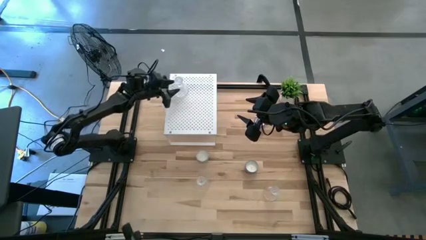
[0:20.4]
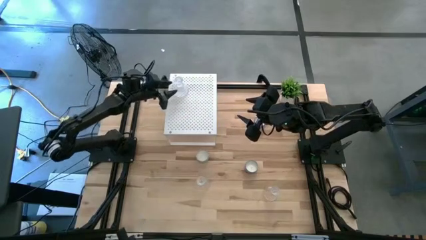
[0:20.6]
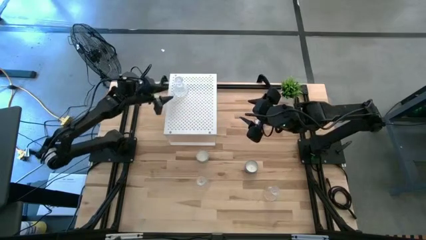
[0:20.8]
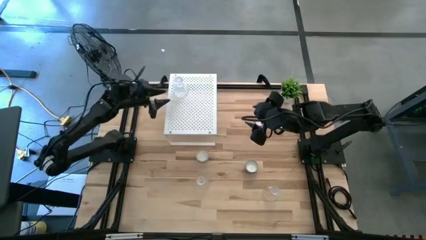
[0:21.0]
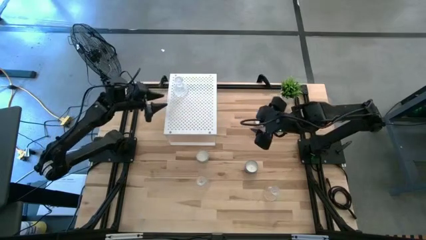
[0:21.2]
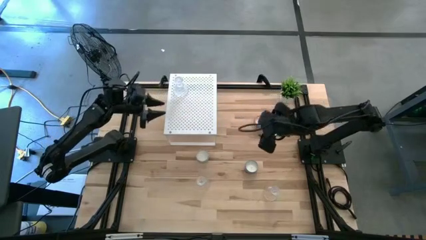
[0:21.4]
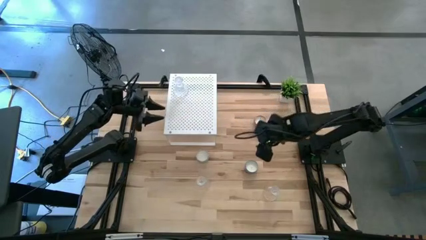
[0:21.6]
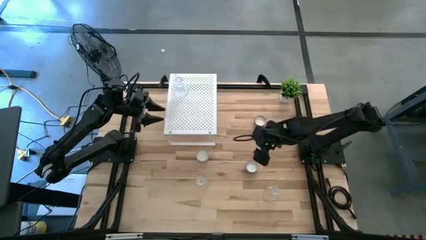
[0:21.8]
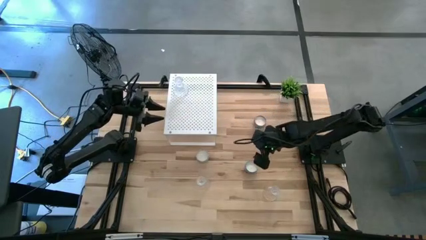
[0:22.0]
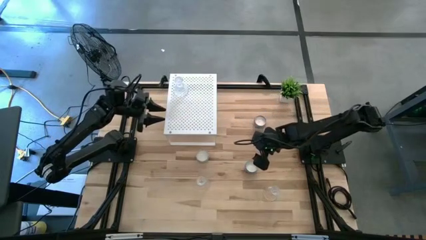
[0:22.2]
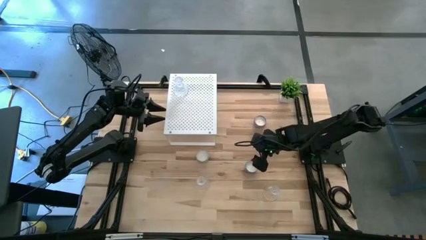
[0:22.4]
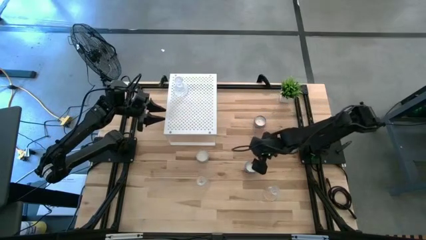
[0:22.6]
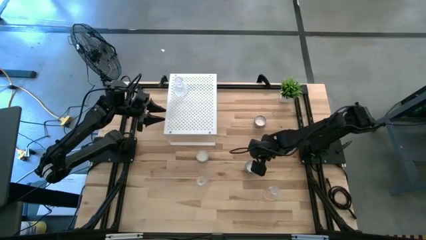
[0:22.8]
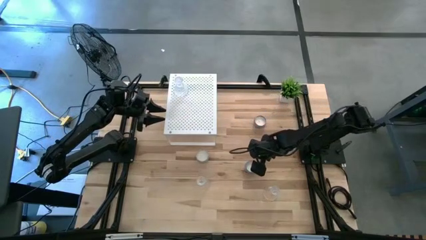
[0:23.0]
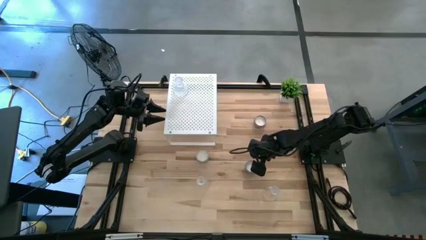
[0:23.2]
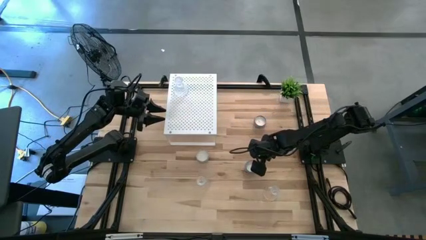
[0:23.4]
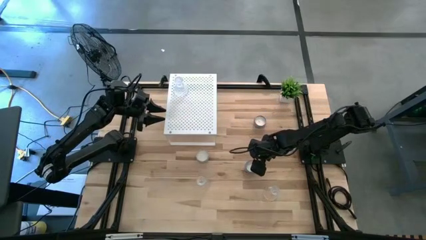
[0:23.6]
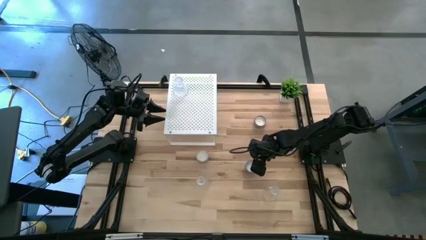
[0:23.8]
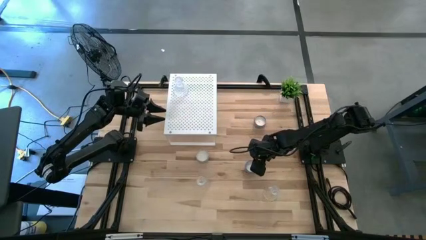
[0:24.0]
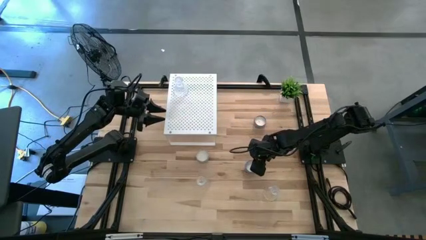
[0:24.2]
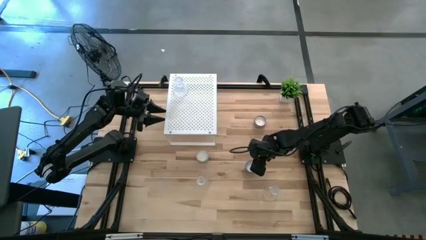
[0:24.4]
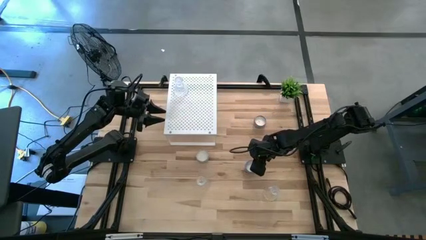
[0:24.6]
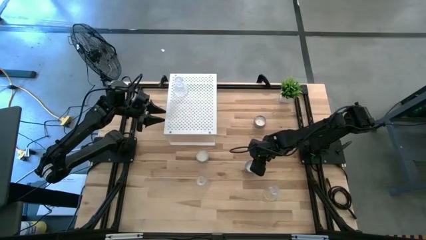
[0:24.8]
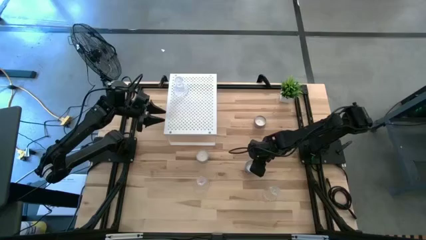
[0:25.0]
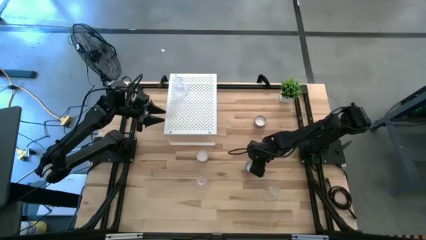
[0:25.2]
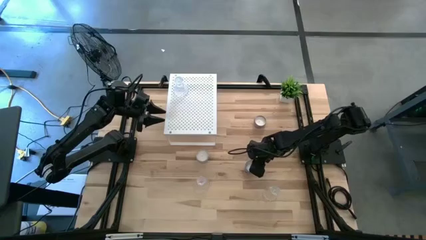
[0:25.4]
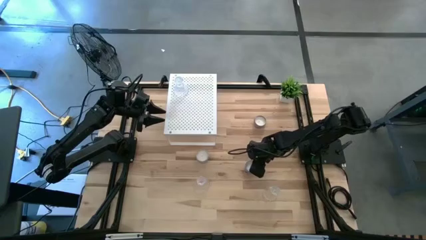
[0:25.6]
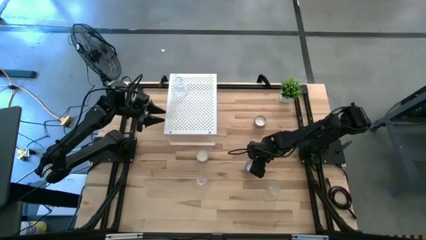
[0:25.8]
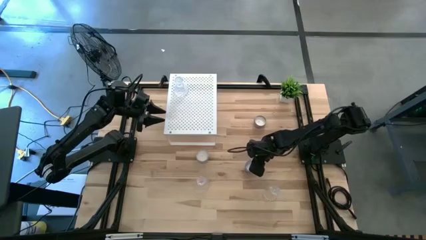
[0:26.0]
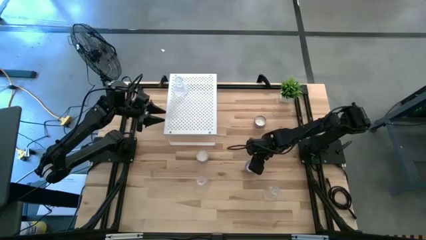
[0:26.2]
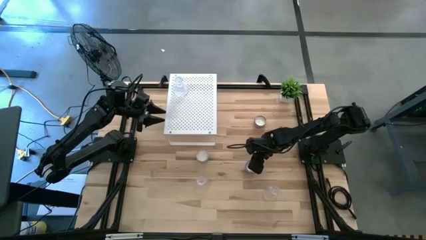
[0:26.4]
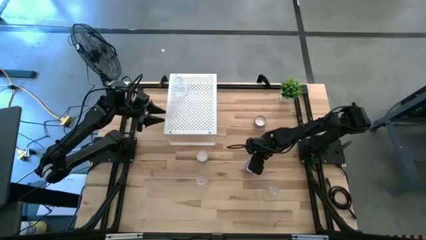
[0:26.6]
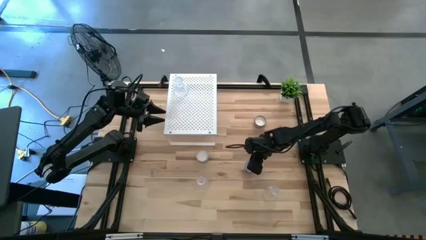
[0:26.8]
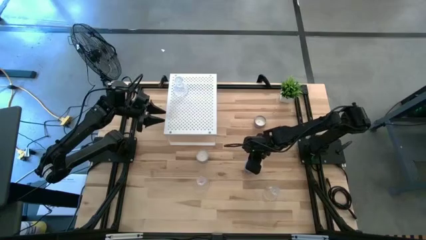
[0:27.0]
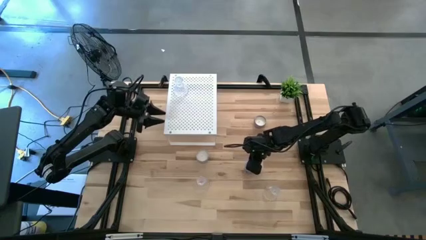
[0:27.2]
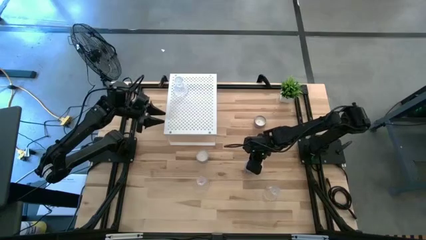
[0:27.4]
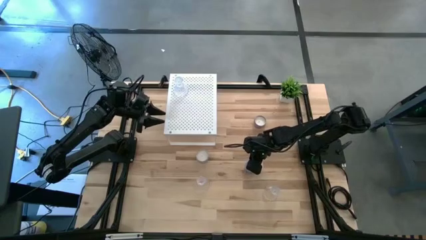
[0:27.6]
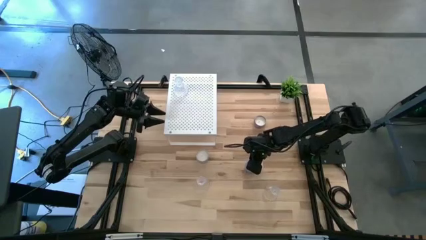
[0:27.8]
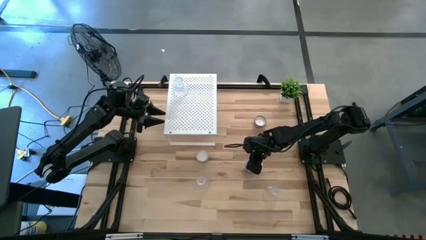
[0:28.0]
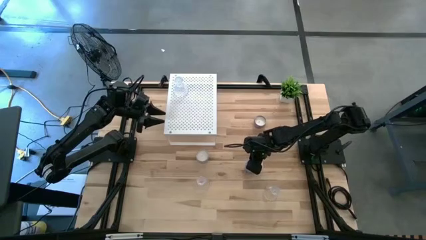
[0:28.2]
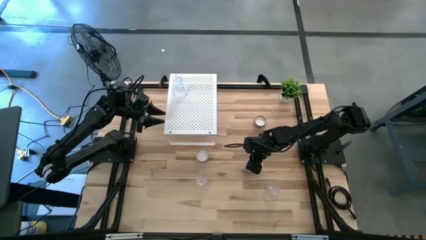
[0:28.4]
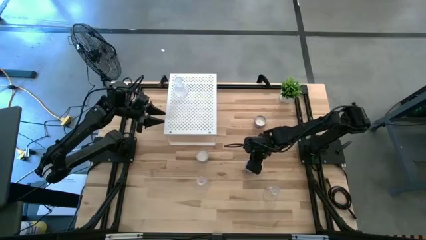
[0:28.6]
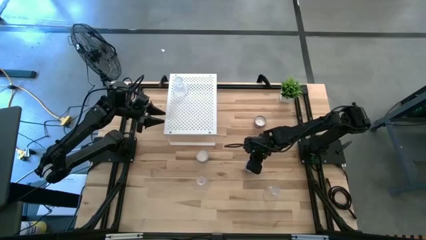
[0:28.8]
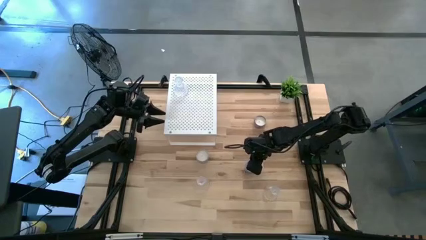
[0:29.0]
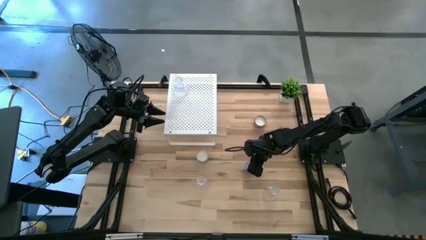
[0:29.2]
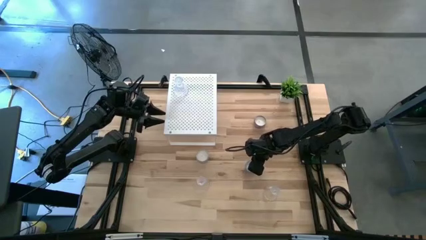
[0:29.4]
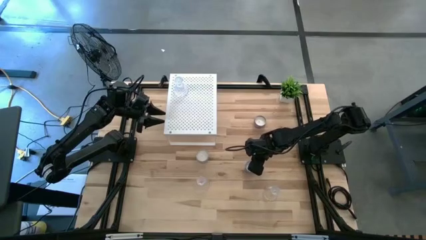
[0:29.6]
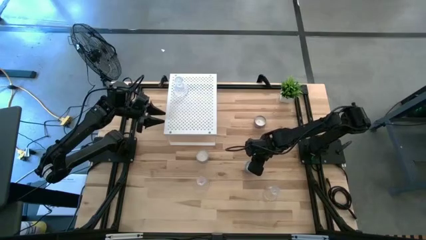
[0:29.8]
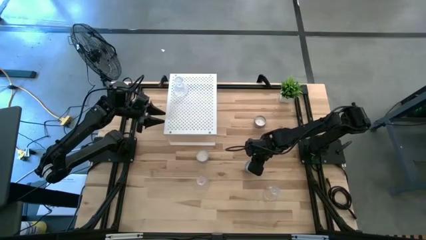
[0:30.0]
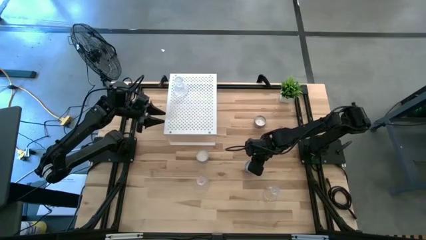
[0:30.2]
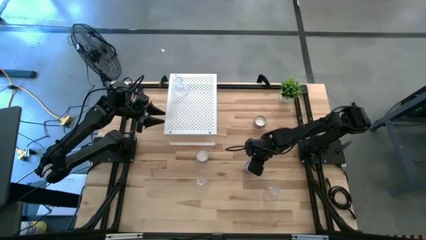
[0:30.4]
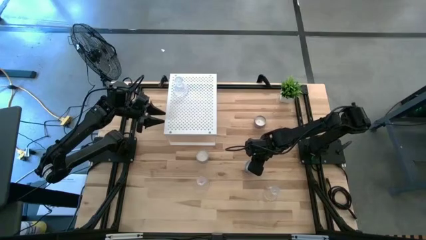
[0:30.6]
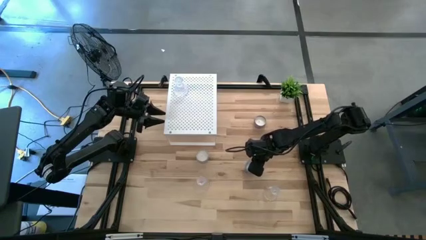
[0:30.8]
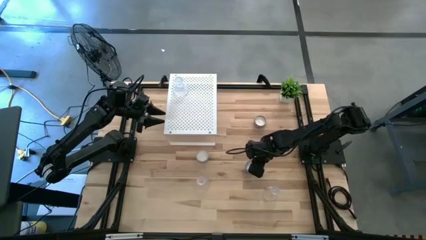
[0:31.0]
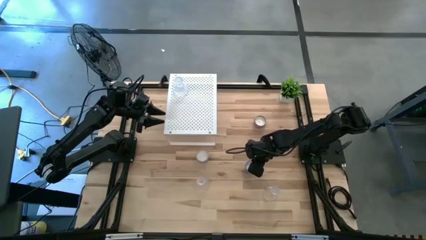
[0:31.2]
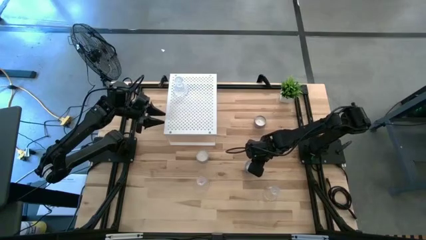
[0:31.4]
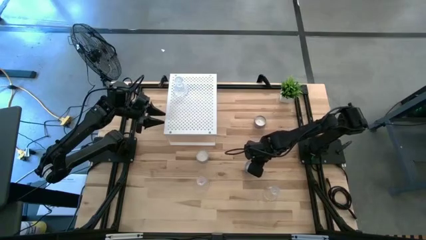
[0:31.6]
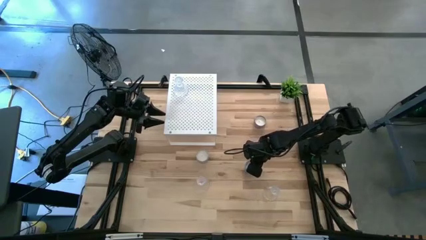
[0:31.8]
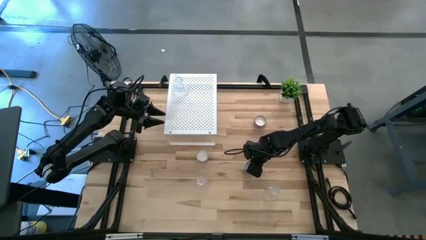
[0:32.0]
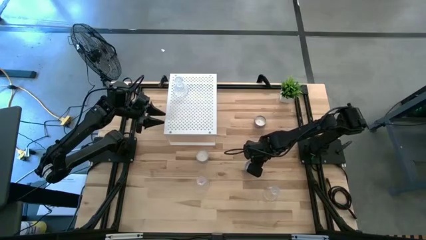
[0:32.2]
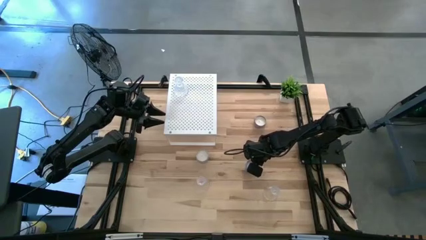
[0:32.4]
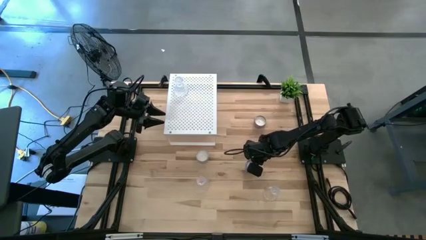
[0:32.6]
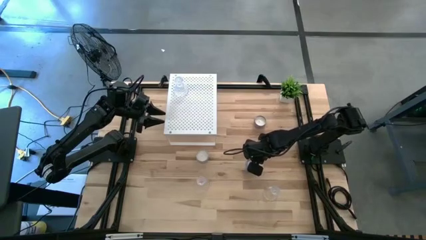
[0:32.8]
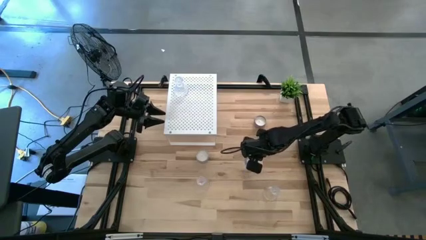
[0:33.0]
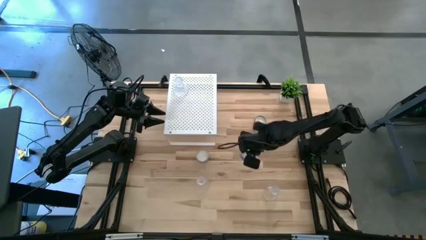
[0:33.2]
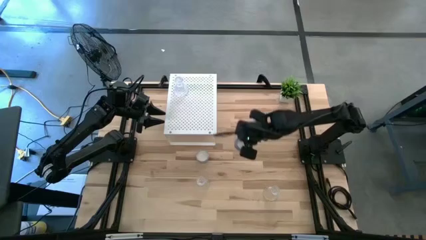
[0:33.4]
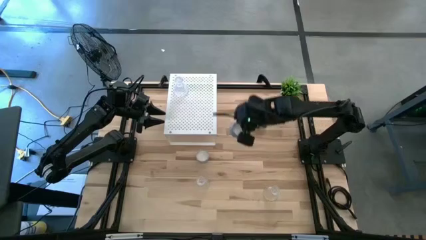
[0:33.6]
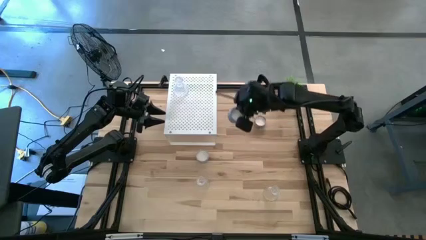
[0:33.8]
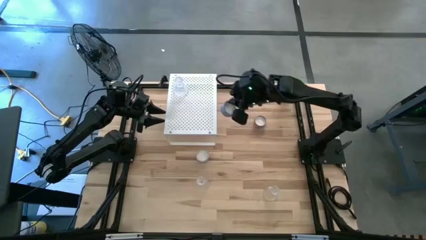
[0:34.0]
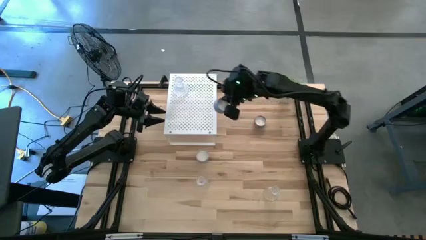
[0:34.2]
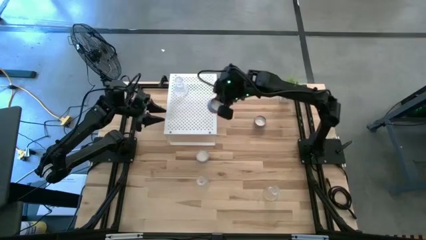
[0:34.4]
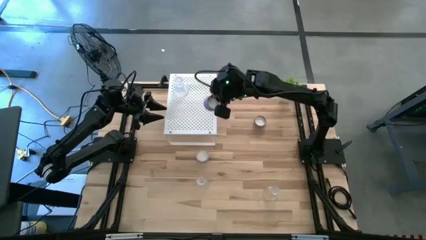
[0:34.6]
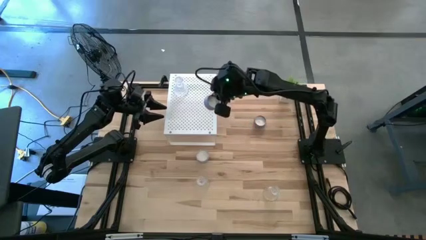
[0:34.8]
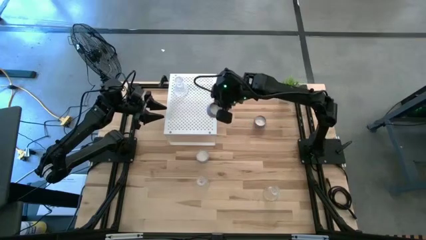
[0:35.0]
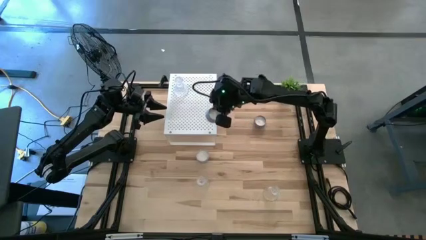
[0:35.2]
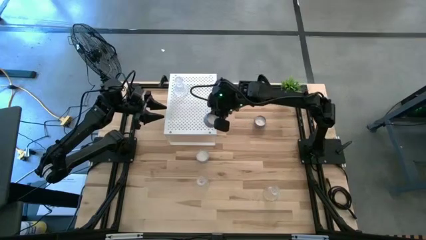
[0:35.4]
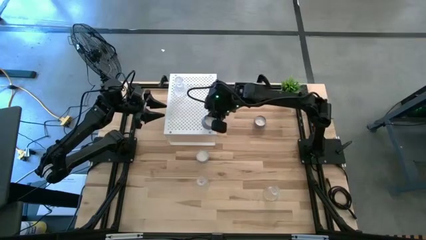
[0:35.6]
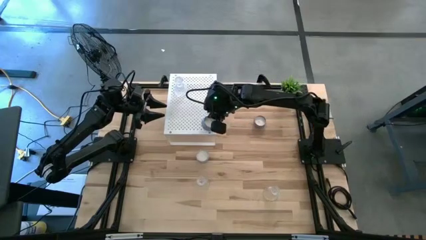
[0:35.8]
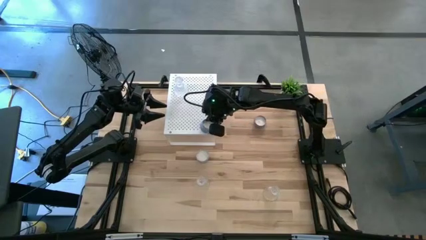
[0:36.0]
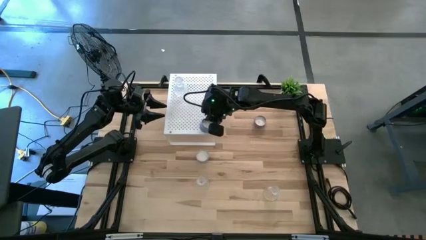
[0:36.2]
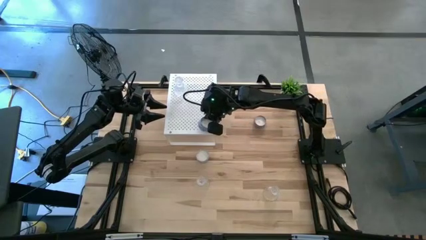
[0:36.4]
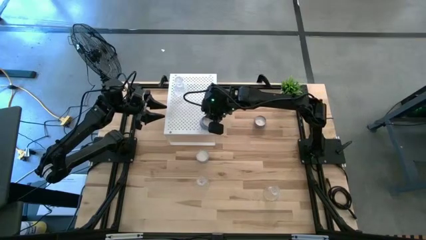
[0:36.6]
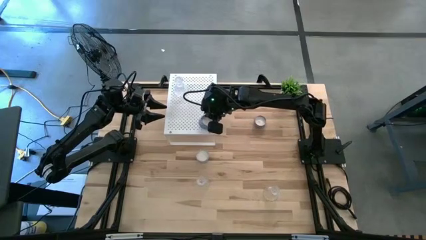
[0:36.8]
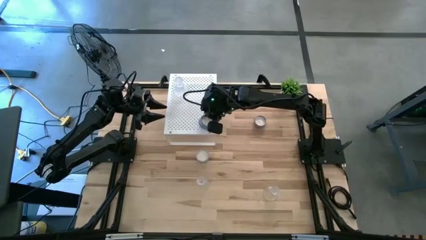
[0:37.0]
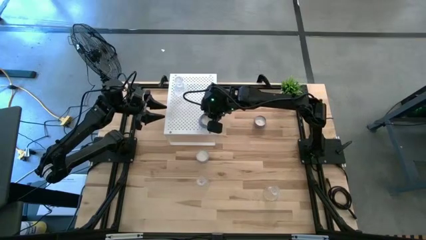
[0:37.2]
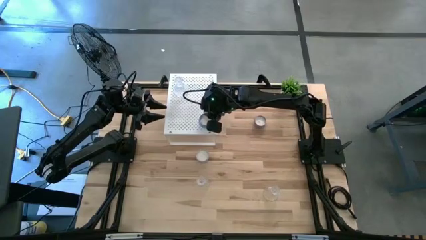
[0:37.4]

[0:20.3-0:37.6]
Task: Pick & Place candle stick holders
Put the blue candle on the shelf
